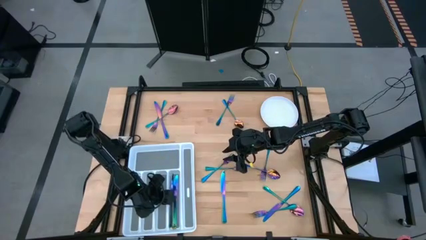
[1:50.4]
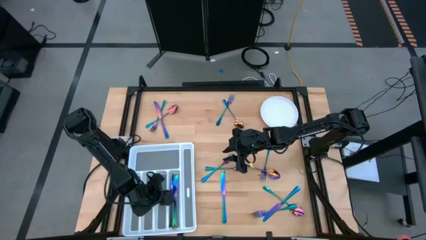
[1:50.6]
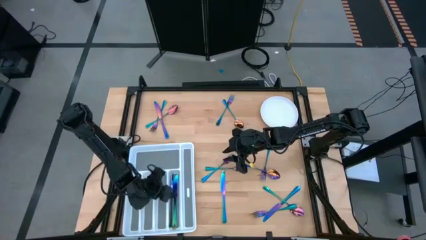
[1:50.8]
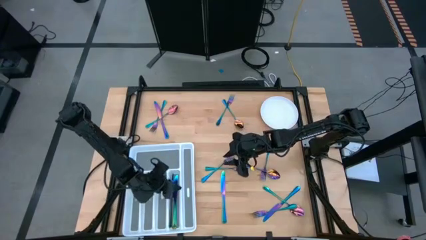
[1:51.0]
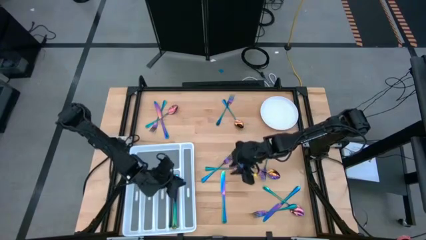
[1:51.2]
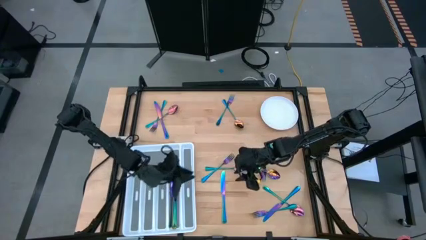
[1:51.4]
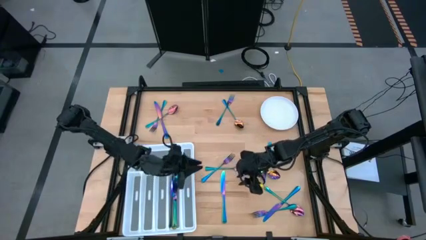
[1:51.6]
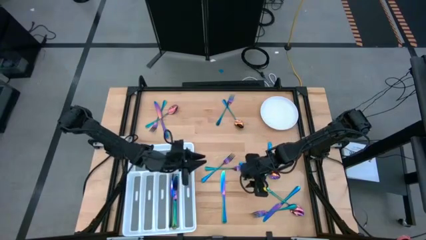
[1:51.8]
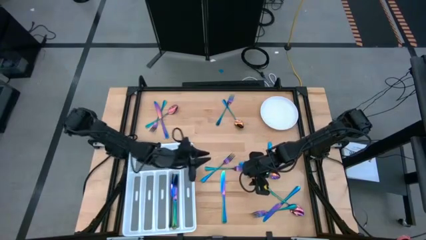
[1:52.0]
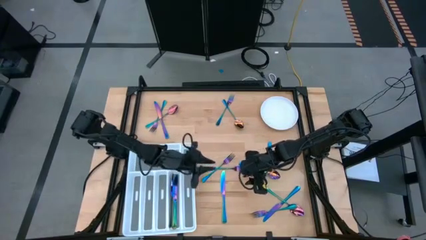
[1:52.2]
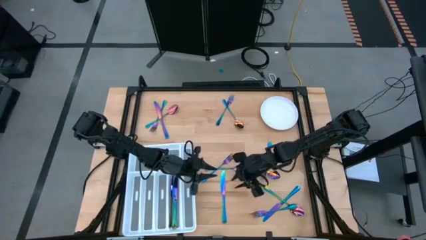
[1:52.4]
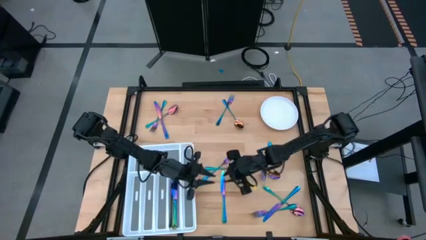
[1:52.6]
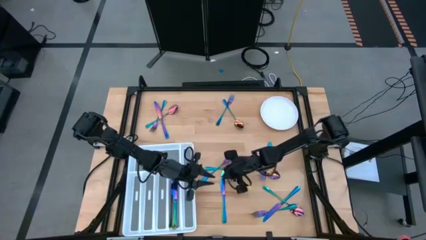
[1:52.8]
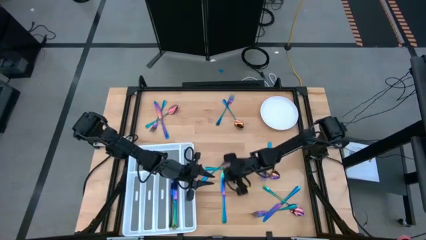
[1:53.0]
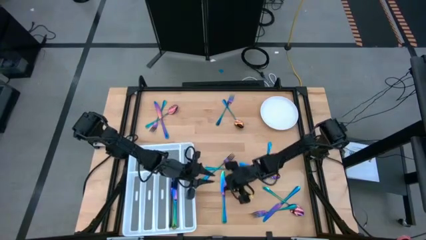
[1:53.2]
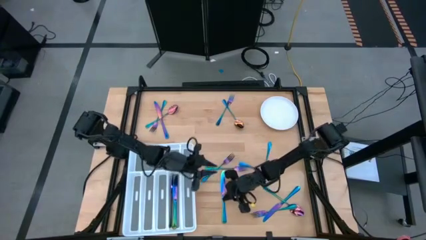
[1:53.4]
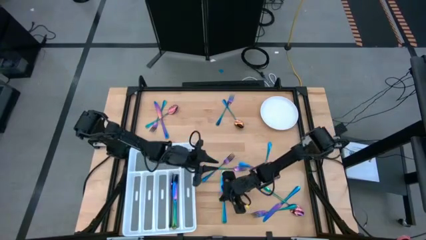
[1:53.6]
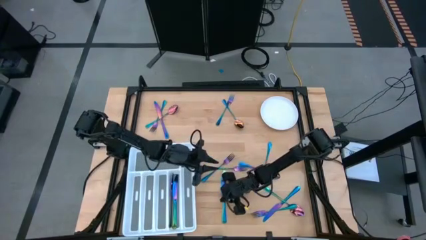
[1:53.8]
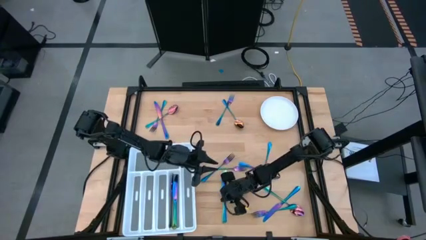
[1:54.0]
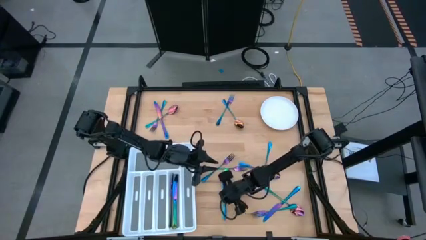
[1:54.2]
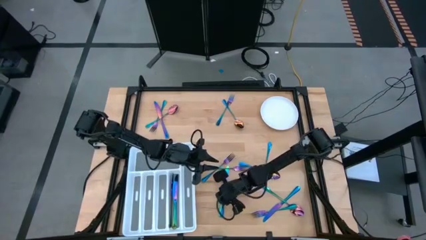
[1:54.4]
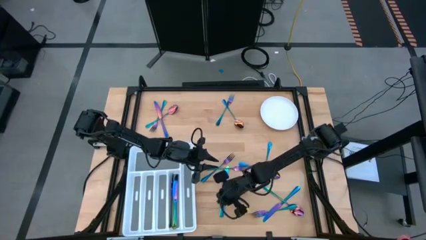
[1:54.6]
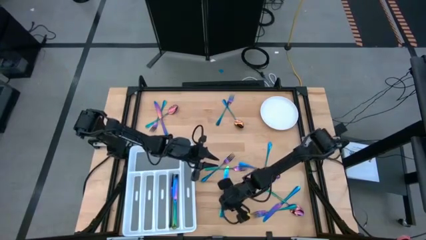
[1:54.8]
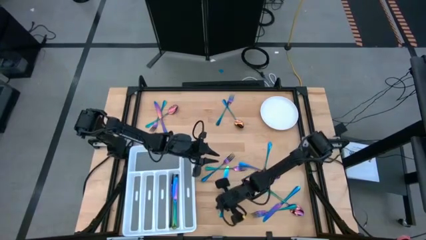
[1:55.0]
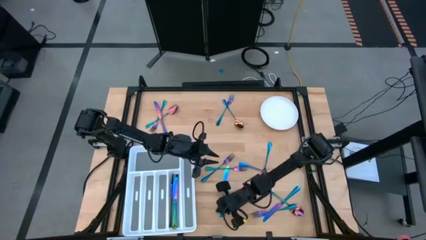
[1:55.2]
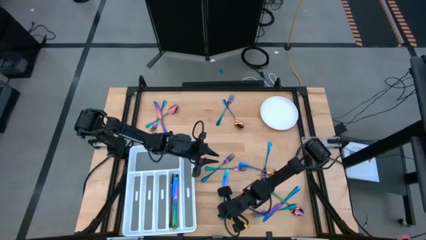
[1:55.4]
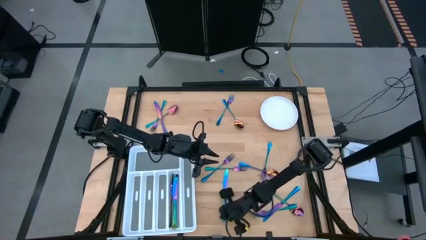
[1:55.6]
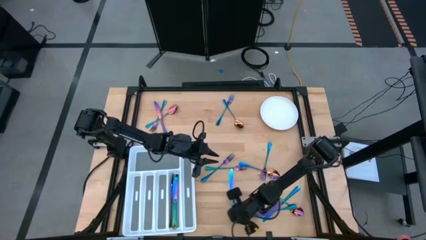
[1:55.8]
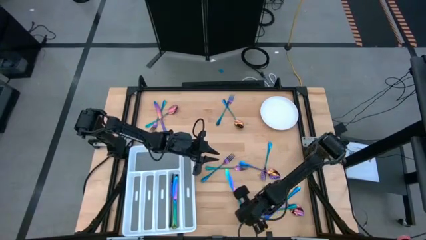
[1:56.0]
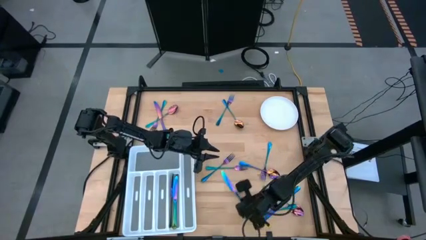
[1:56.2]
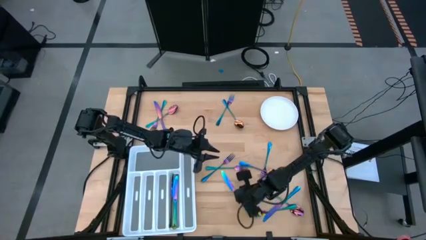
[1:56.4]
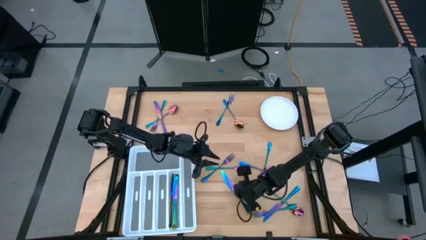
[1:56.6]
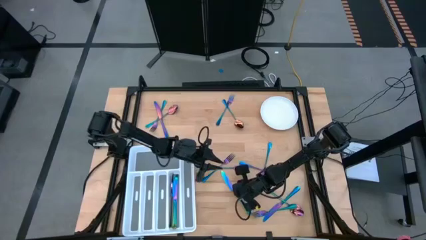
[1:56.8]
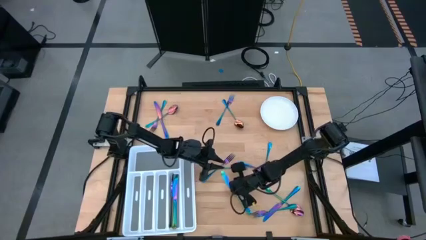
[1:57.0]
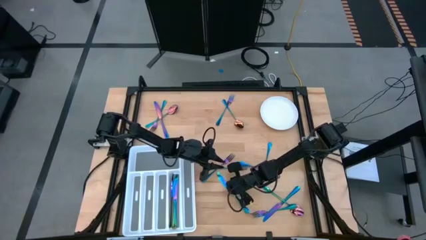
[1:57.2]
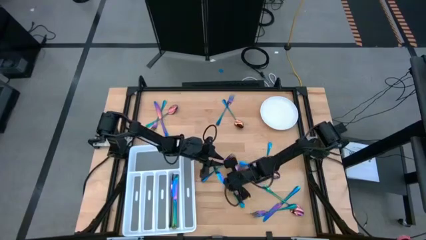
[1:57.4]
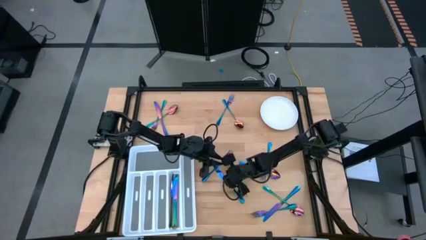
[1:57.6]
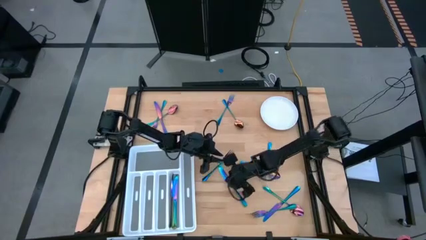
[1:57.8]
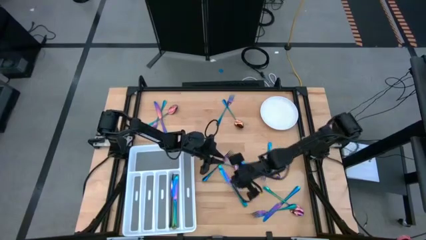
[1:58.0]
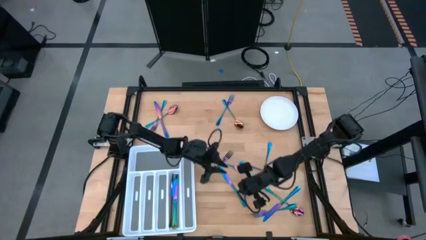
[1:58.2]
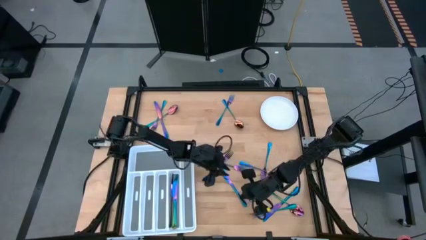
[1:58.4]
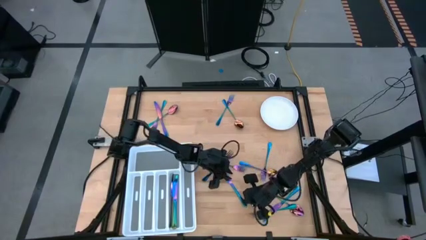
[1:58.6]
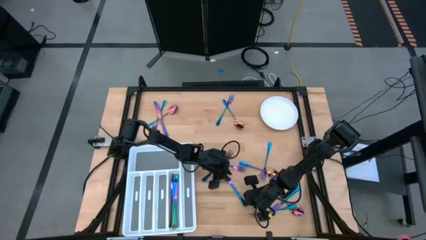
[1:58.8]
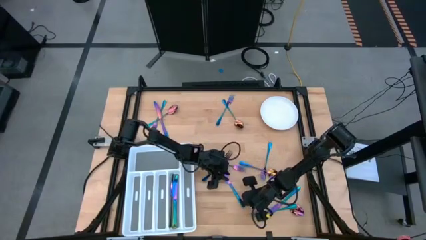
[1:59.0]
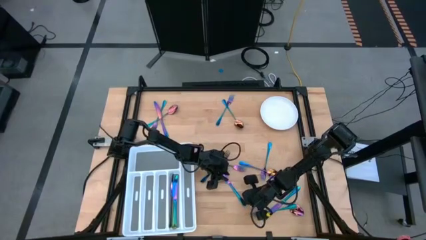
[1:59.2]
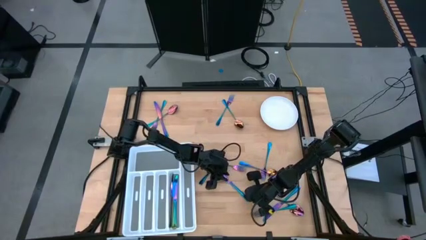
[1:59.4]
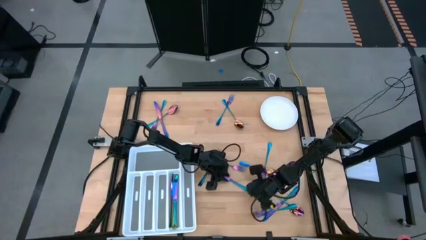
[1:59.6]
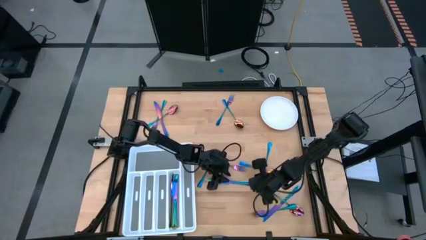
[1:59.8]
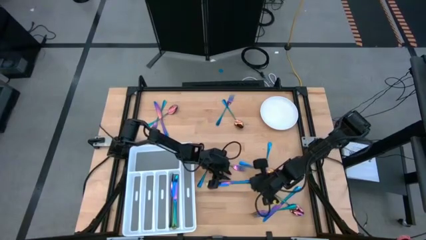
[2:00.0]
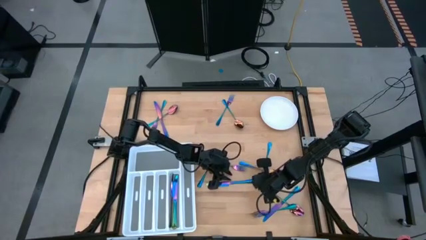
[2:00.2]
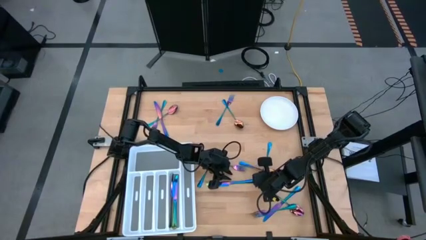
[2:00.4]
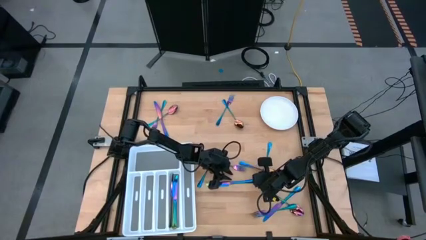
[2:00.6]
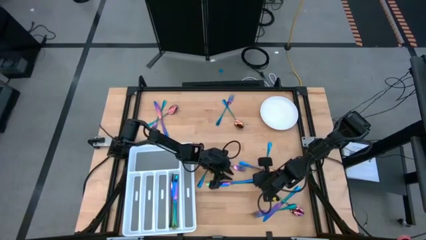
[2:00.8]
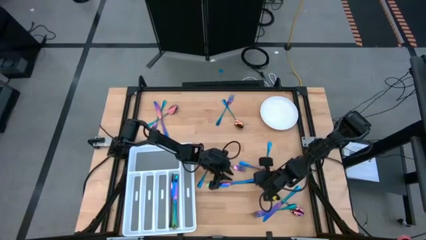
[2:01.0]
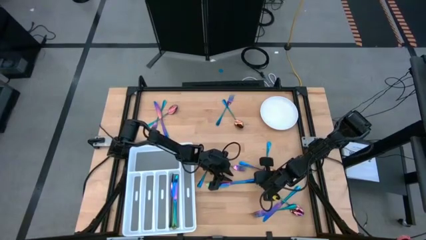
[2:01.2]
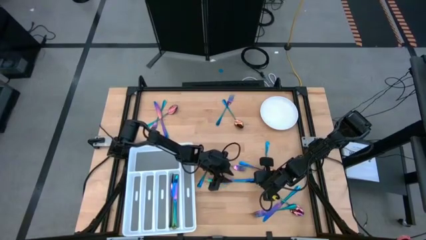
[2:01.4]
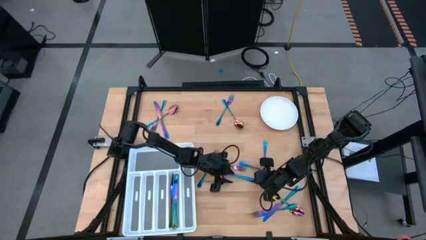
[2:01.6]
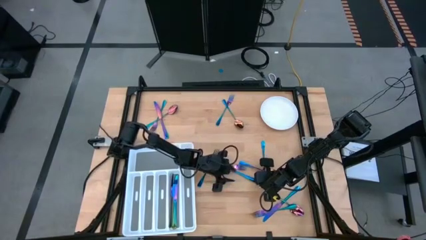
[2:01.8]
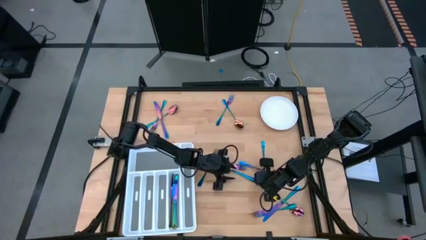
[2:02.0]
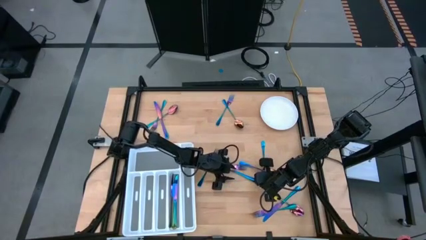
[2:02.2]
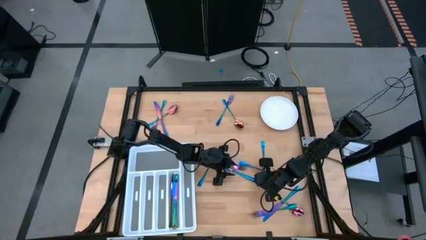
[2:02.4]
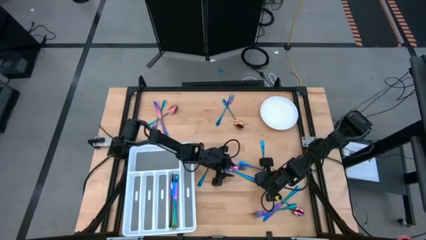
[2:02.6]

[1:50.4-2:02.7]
Task: Sort silverware
Put the bottom left iridescent knife into the cutlery tray

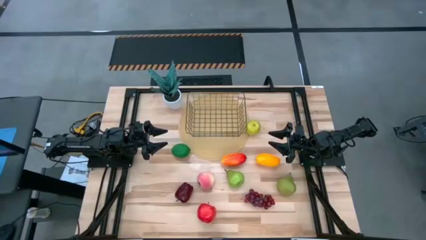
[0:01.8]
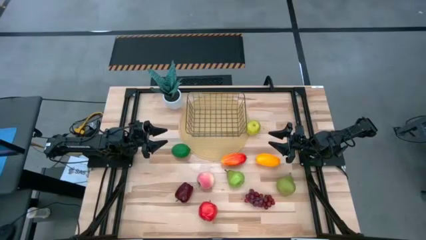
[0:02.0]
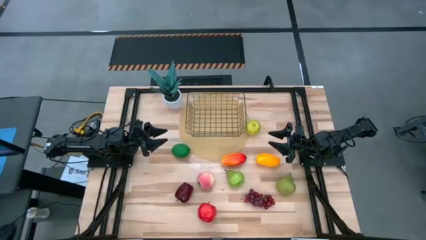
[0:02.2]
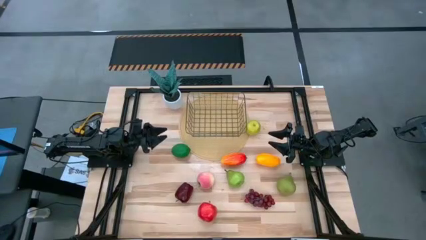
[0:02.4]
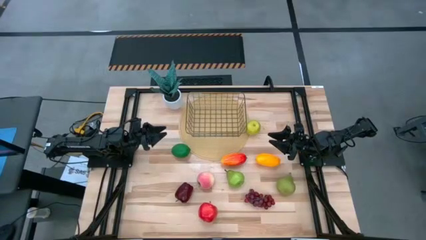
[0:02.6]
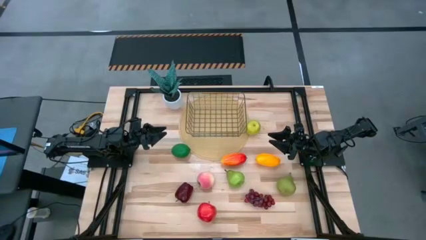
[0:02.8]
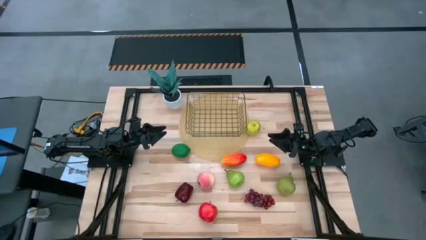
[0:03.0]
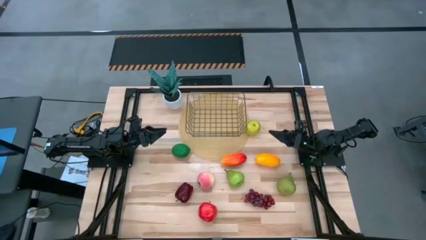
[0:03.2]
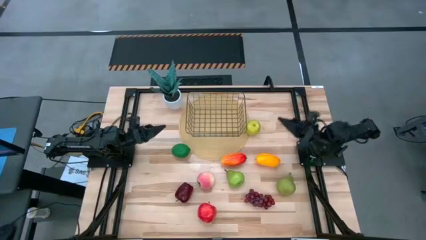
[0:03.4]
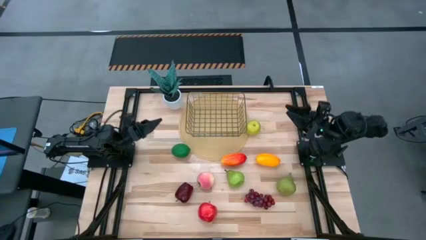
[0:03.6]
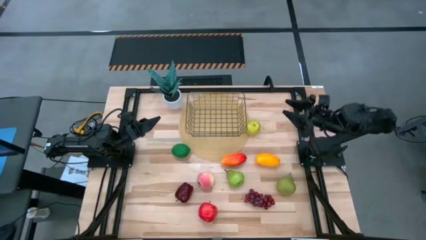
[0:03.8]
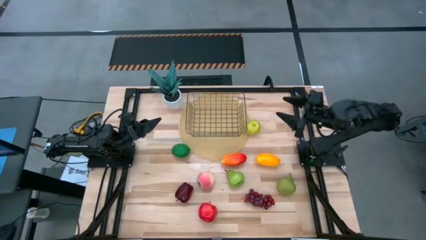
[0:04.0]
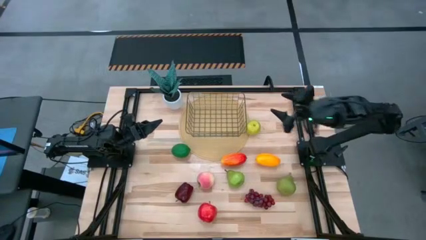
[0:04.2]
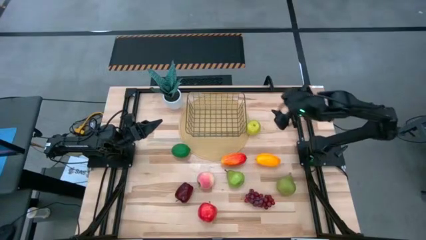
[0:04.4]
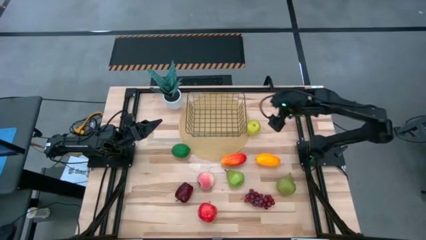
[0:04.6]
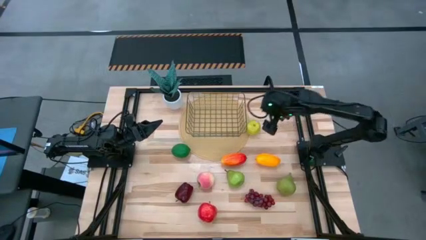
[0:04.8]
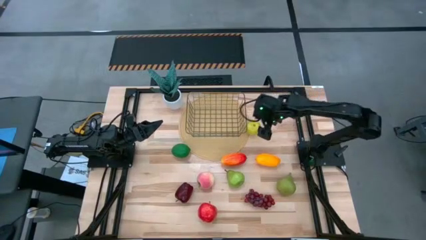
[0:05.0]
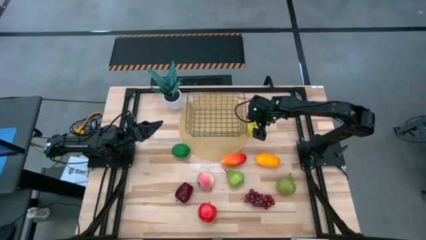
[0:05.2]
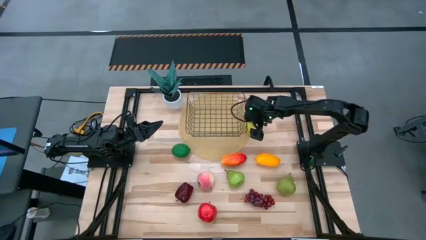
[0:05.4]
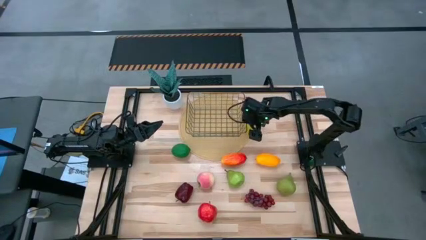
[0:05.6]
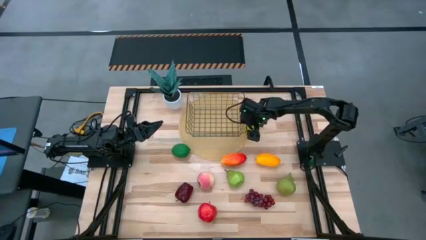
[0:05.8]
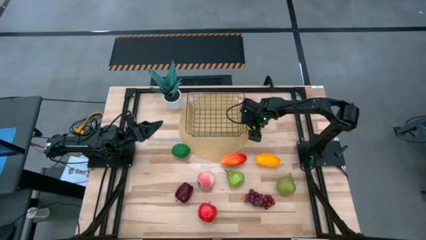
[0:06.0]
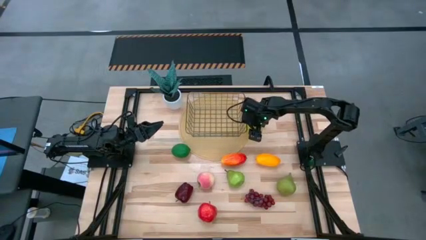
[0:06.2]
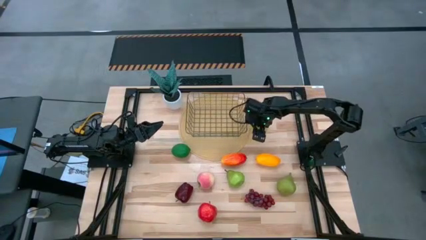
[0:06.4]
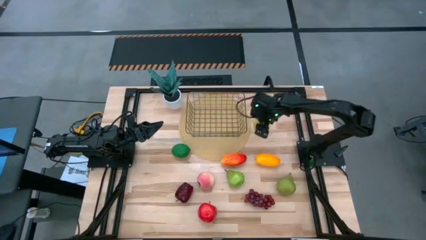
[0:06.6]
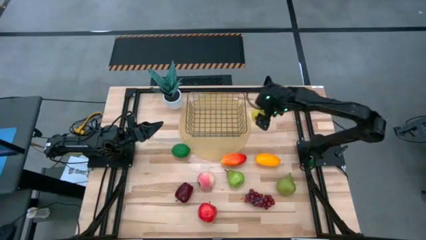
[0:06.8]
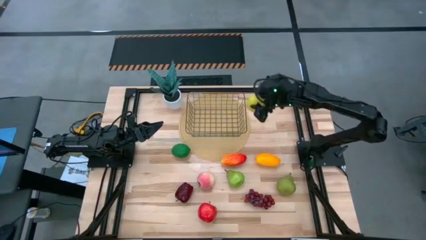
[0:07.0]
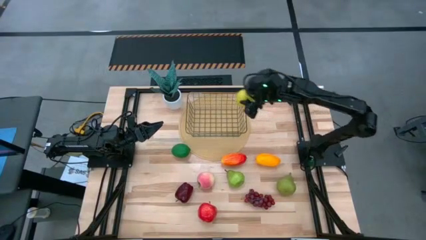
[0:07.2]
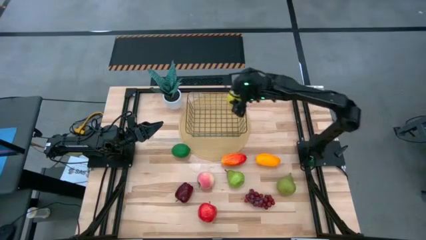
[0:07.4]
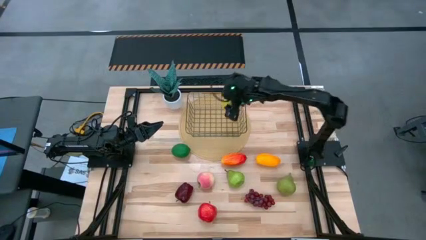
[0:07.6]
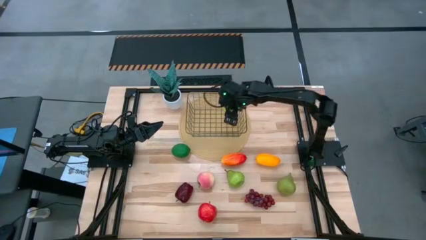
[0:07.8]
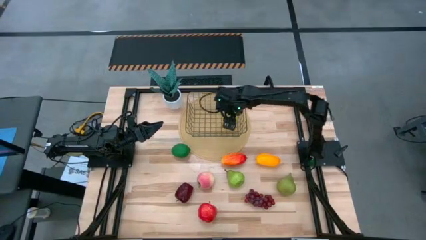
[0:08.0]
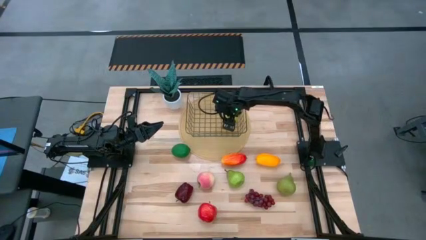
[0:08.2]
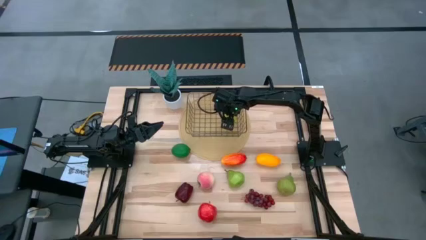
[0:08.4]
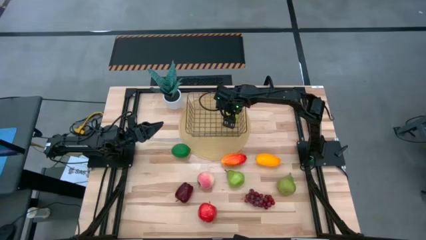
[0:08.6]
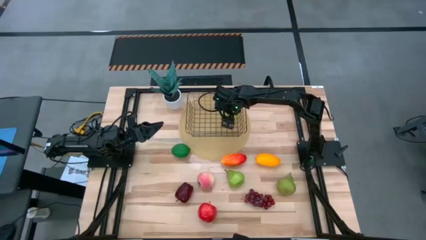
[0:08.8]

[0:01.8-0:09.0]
Task: Build produce basket
Put the green apple into the wire basket
